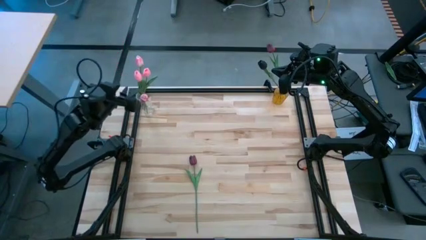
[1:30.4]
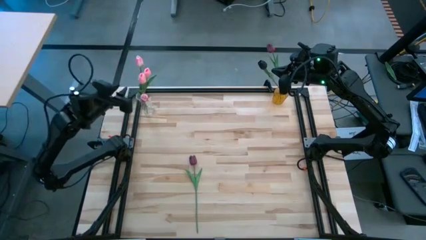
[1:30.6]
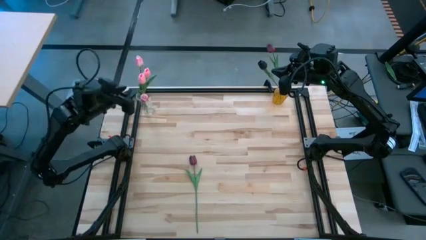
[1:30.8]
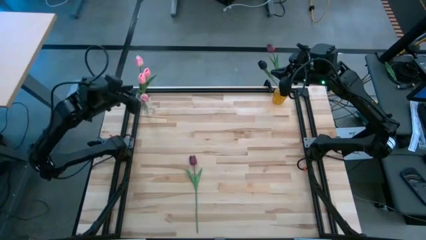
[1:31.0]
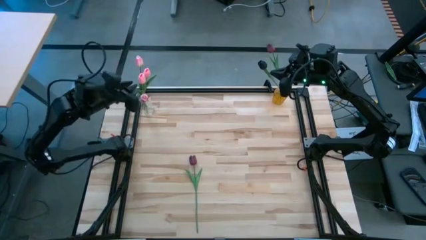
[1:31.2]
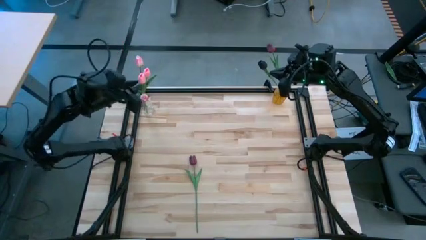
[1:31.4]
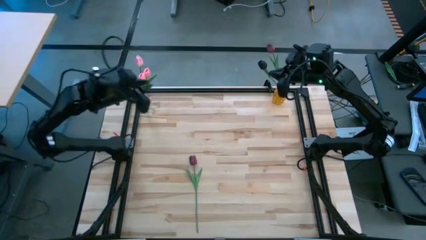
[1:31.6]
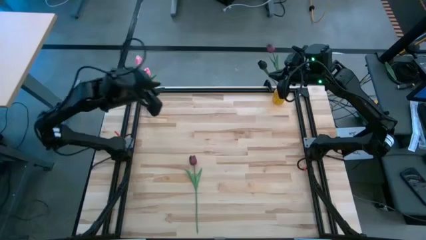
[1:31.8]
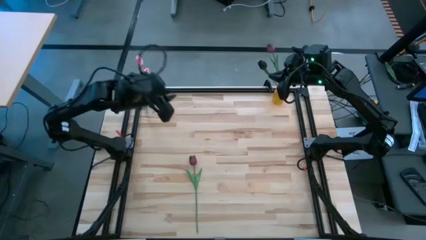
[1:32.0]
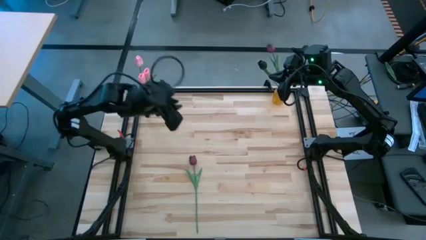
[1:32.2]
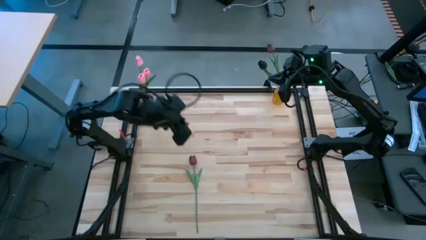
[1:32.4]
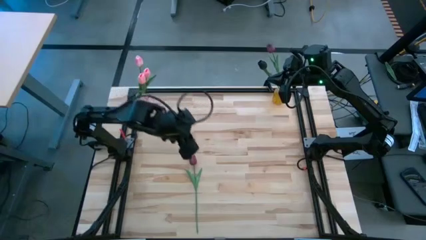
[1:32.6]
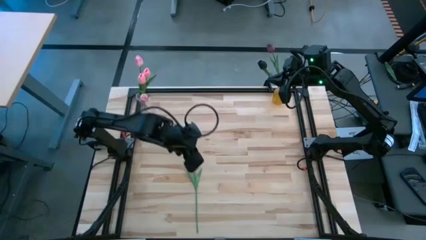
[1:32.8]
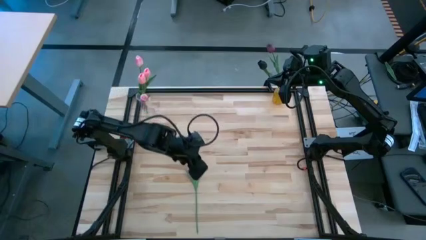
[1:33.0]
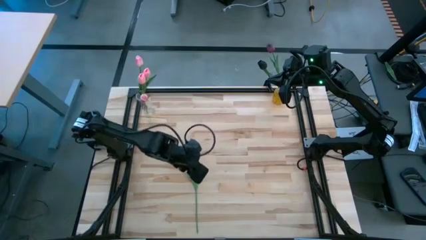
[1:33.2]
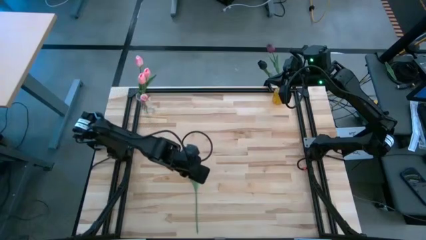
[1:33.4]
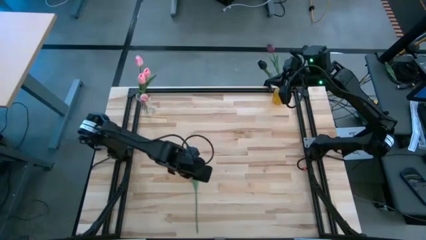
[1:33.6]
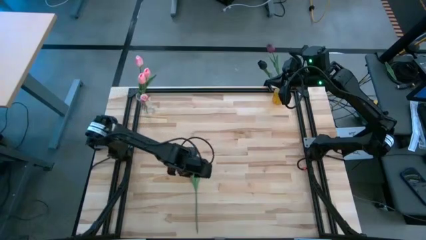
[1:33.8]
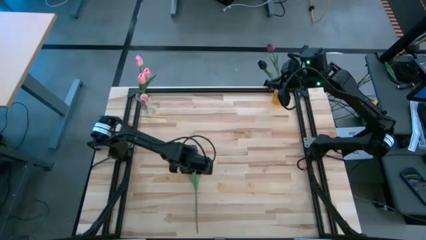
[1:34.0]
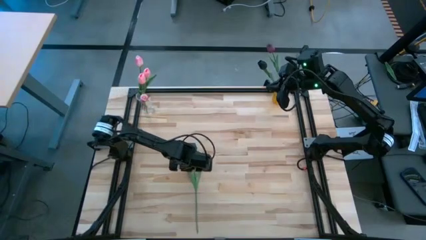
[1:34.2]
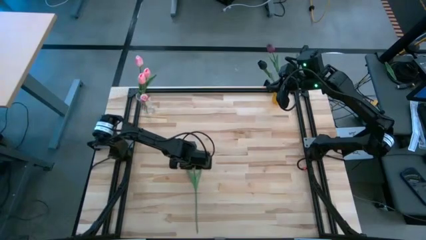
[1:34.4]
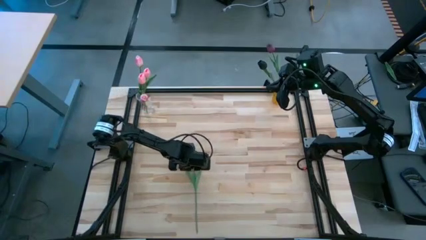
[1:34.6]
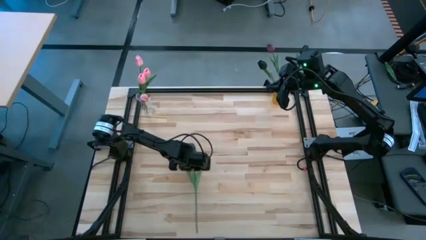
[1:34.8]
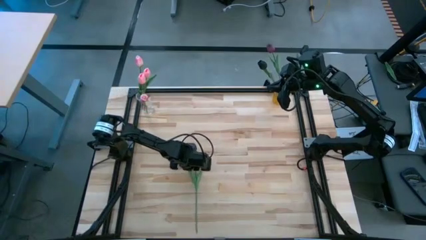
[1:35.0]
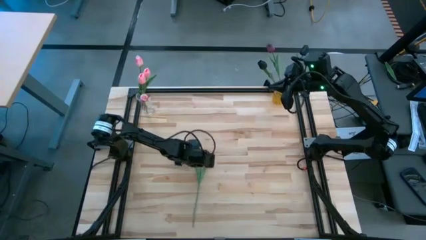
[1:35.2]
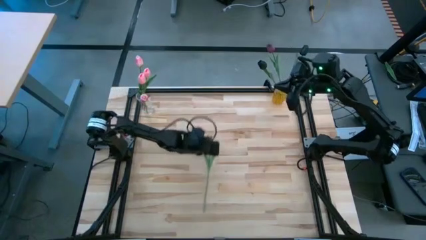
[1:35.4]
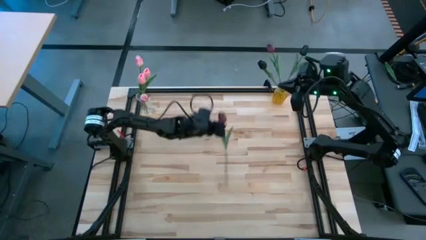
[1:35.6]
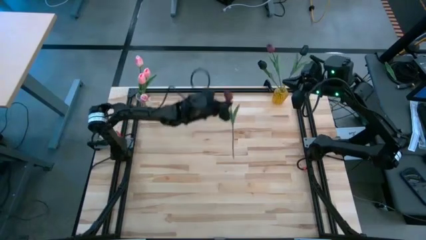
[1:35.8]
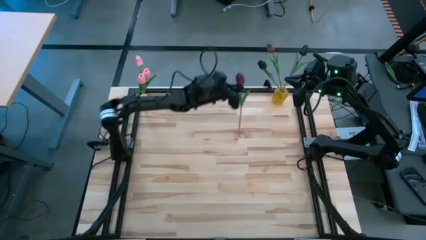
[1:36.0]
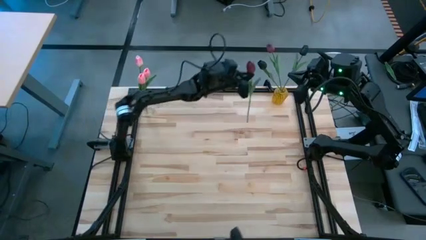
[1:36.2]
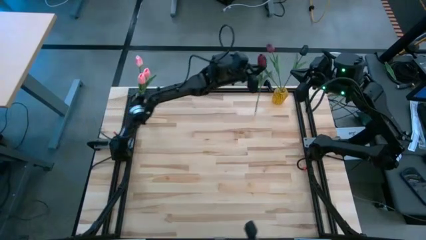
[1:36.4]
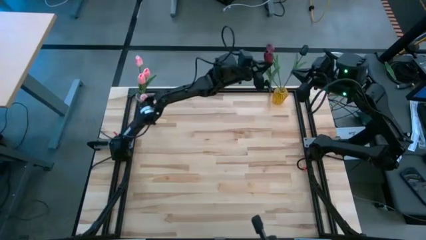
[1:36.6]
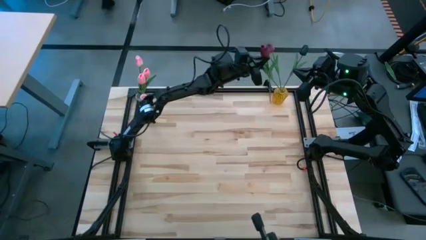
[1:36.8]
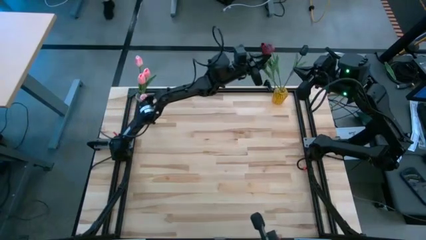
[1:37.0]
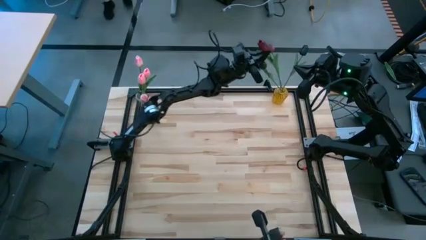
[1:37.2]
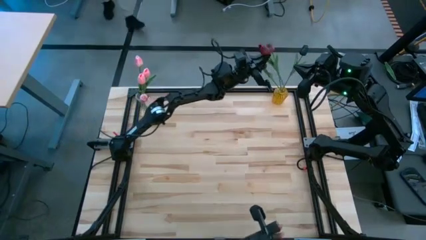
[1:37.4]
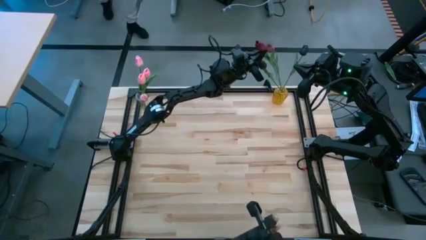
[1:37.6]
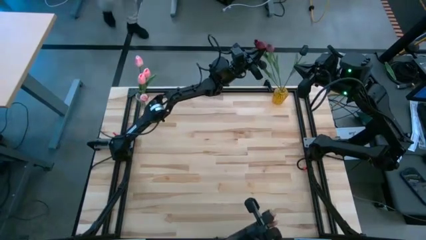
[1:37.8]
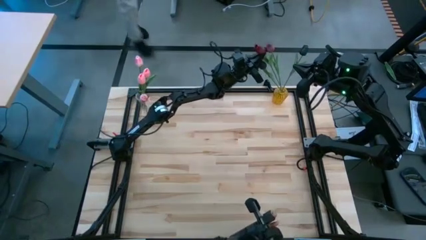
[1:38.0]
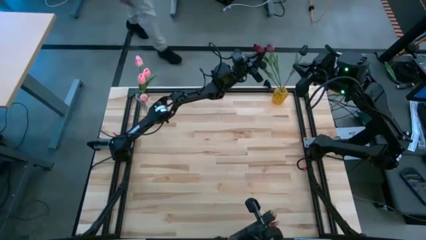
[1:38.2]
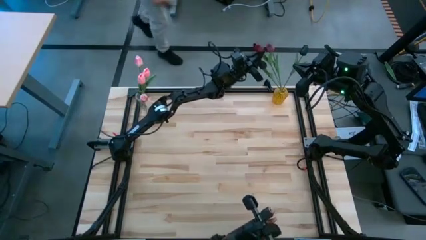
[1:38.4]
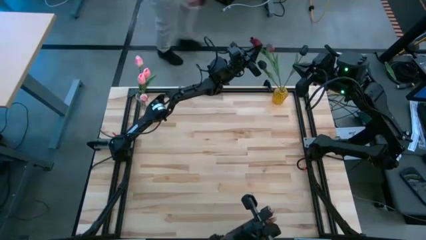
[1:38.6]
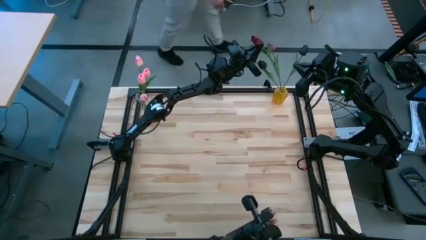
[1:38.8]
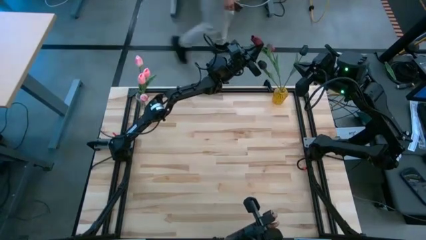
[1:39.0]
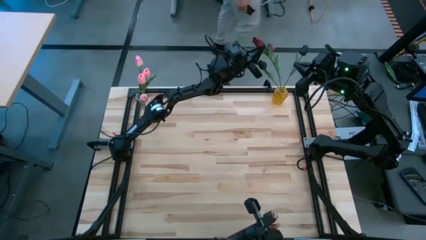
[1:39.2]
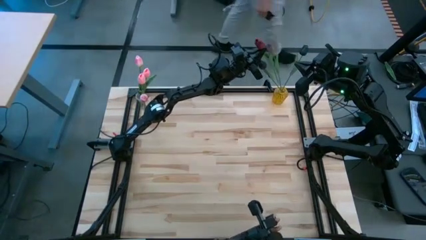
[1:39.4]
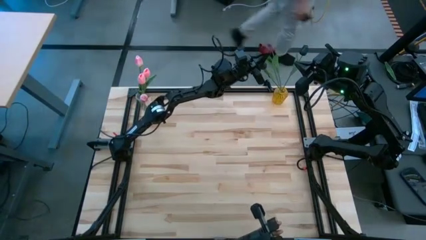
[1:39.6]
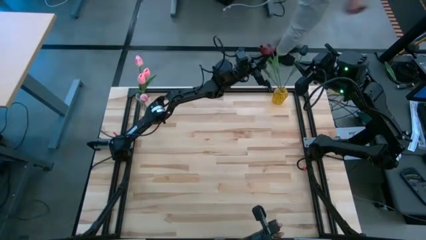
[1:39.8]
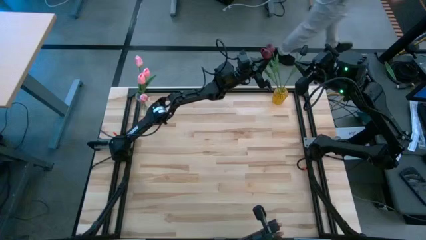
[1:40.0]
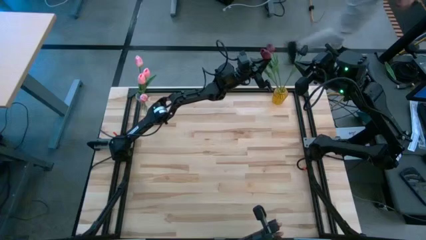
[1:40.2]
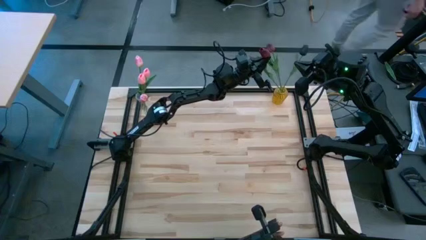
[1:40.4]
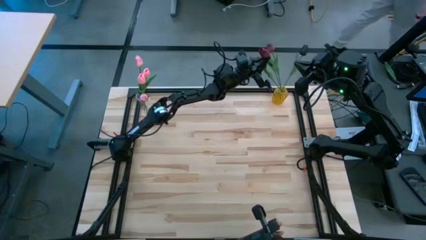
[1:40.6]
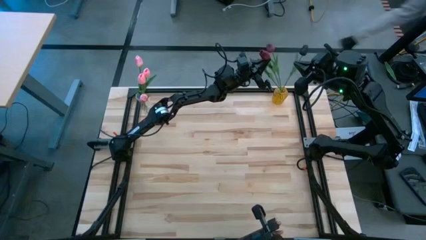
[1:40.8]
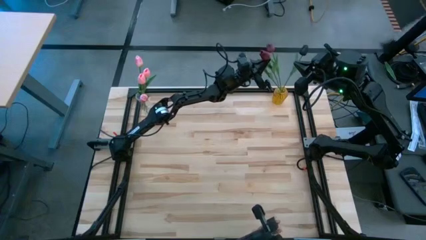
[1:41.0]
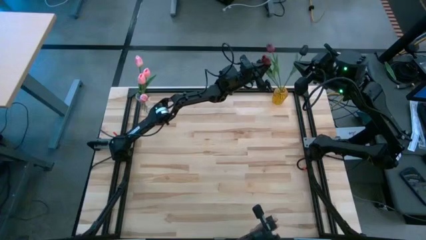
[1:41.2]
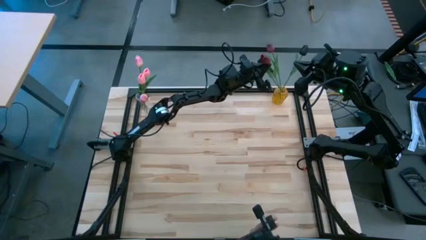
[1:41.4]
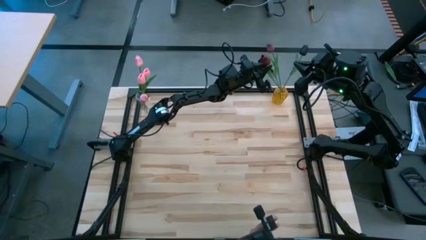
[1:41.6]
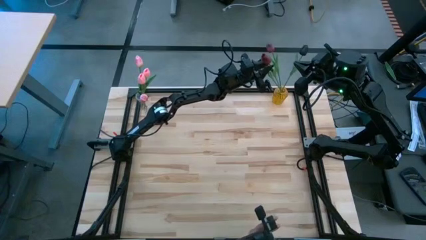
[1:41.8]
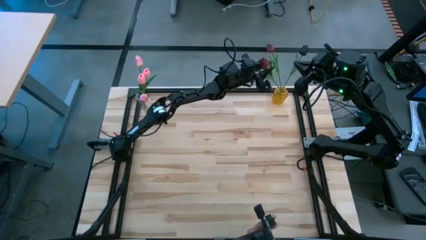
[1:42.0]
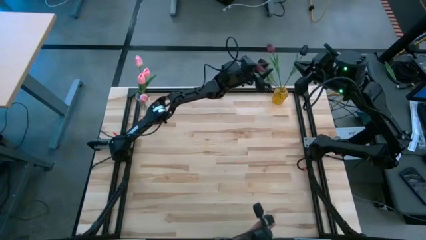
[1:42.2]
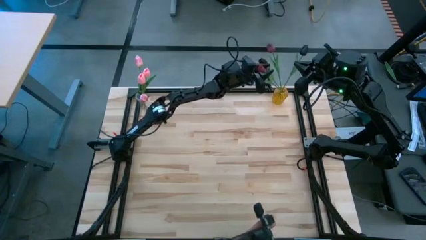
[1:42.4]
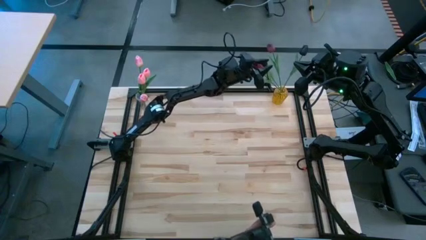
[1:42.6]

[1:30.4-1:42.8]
Task: Sort flowers into vase by color
Put the red flower into the yellow vase

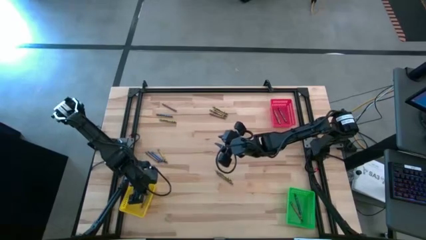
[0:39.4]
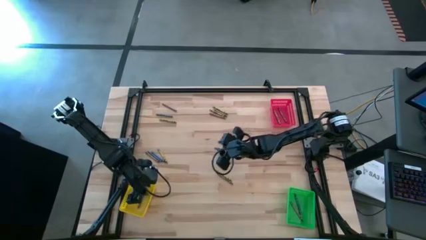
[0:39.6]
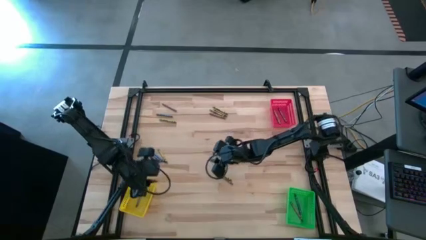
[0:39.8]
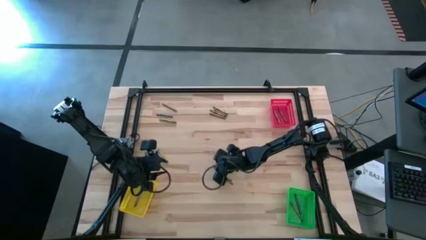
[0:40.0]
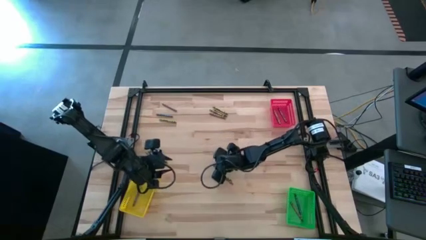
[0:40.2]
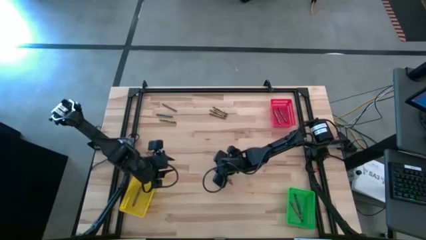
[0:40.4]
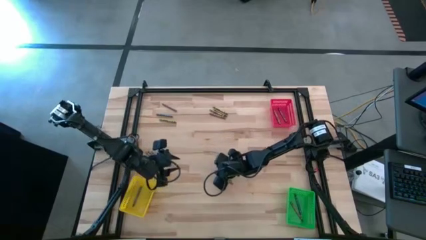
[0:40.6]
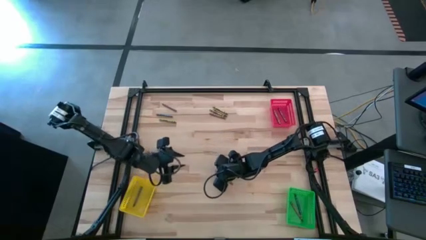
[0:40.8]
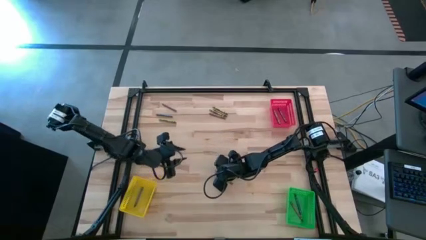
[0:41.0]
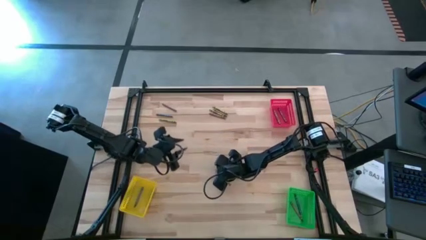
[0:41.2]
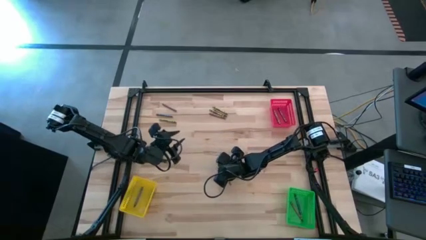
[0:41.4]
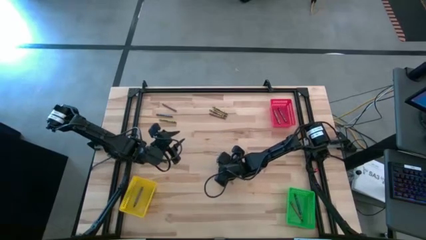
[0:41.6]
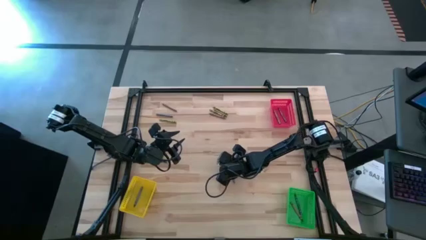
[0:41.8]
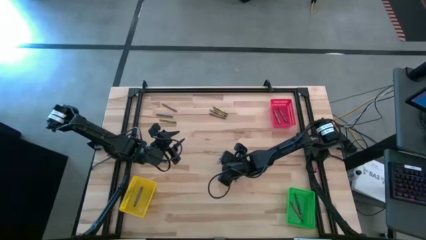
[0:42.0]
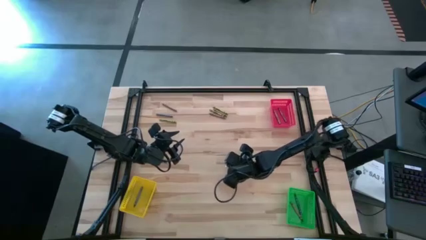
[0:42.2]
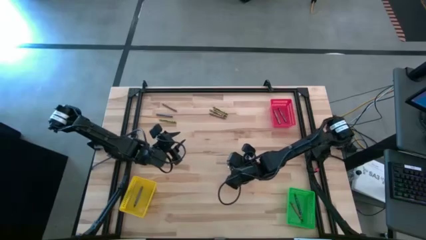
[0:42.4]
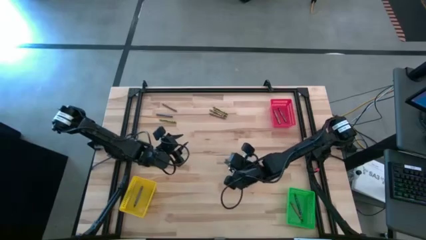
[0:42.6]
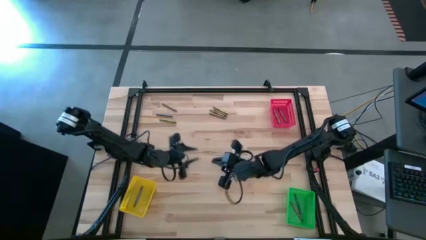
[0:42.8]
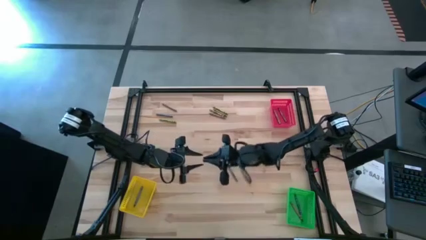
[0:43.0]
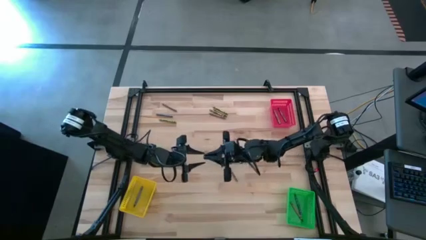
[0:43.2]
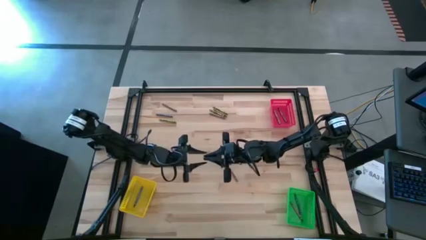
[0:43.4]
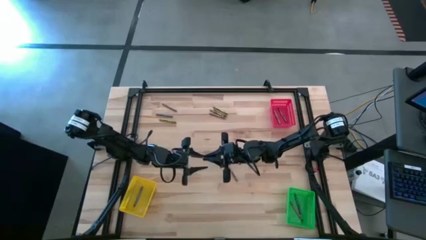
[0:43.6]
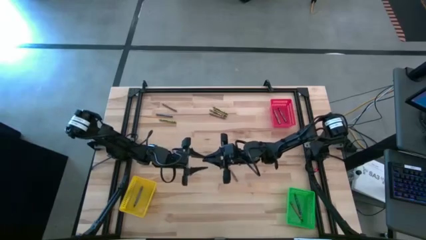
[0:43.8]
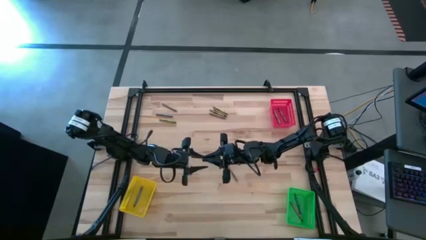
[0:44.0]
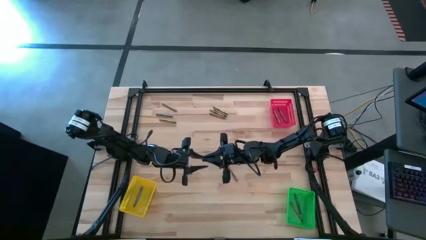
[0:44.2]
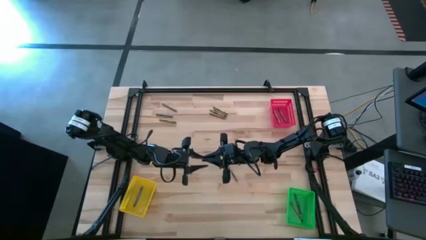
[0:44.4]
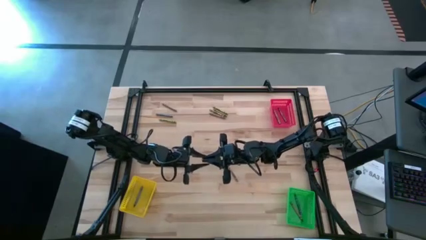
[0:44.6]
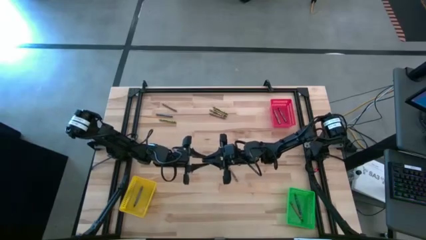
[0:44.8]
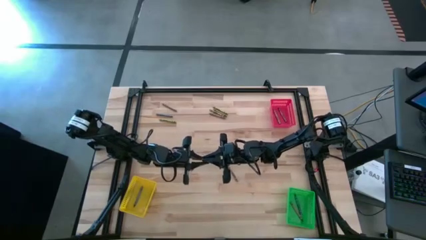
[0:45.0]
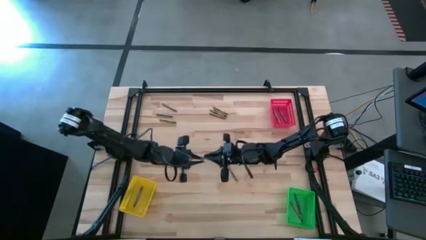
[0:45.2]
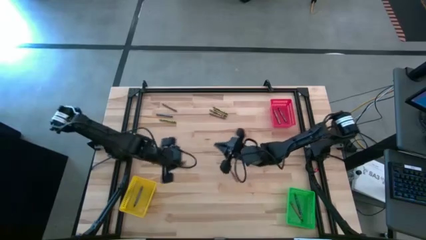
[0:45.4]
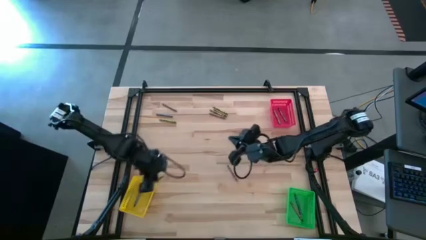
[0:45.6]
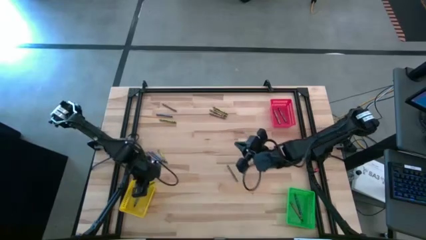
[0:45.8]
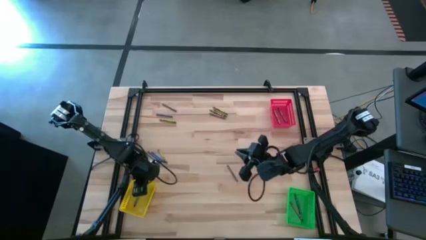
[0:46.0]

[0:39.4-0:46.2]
Task: Sort crayons
Put the green crayon into the yellow bin
